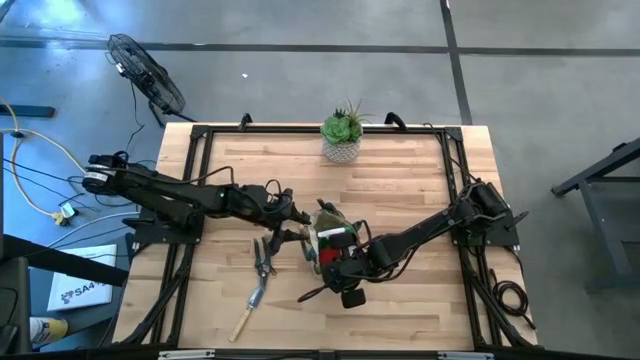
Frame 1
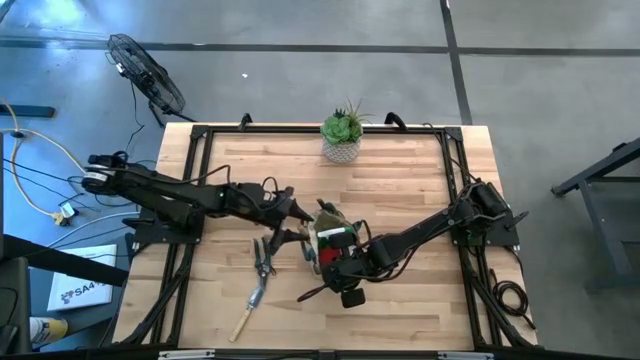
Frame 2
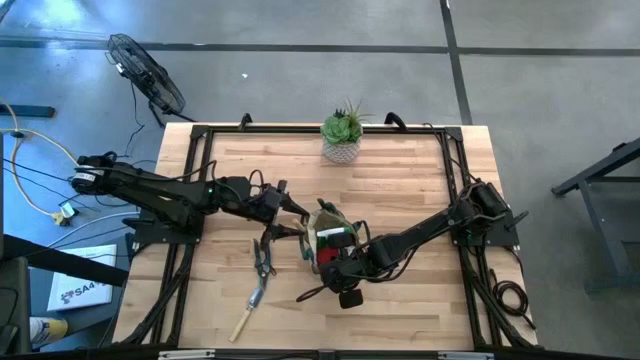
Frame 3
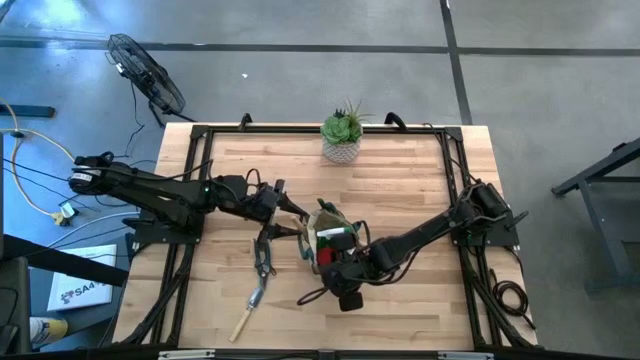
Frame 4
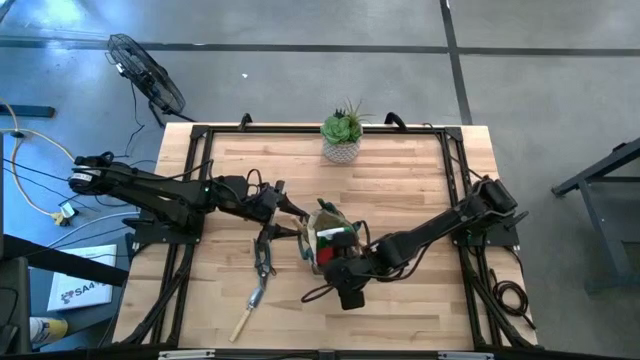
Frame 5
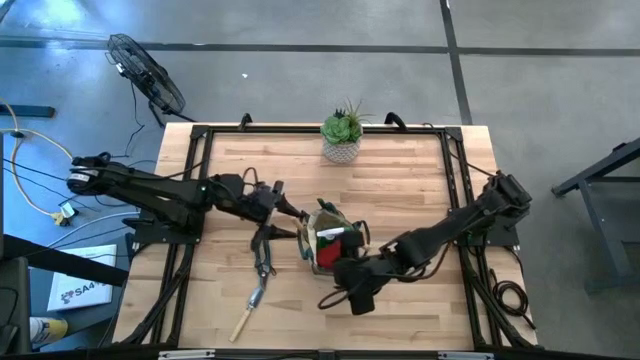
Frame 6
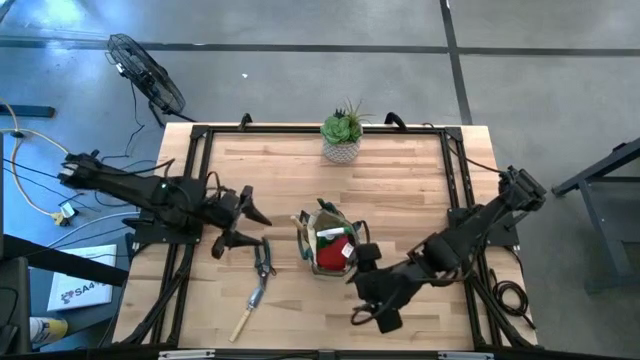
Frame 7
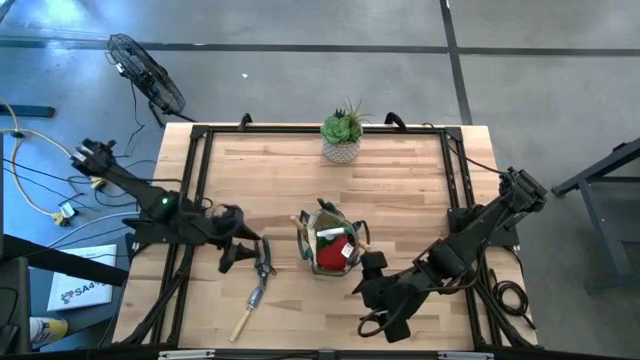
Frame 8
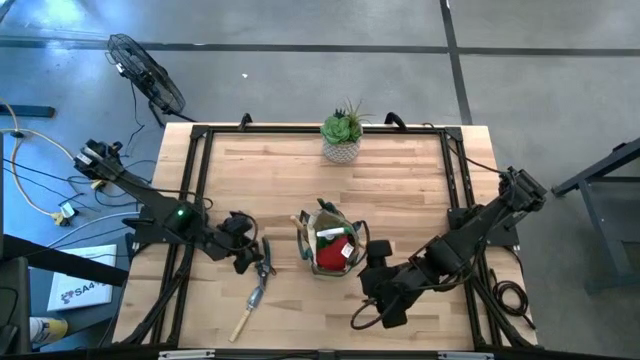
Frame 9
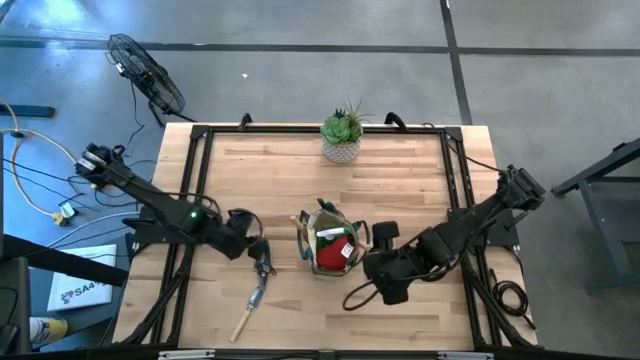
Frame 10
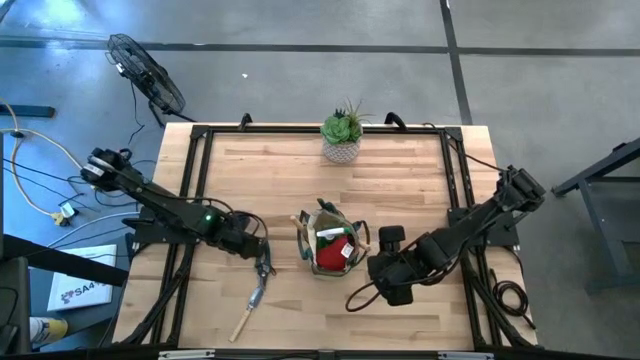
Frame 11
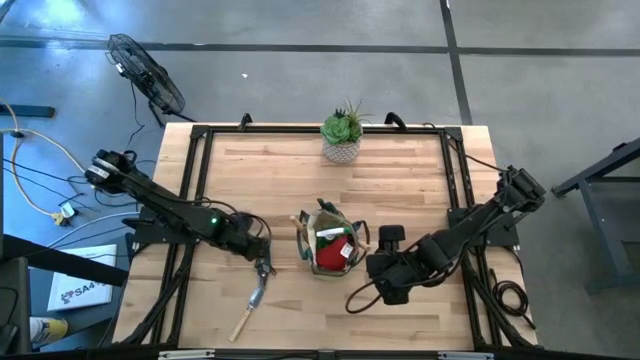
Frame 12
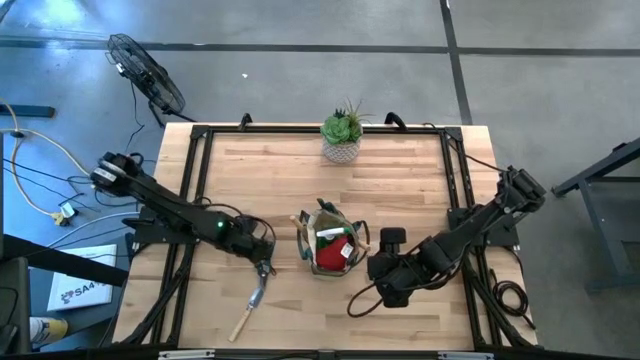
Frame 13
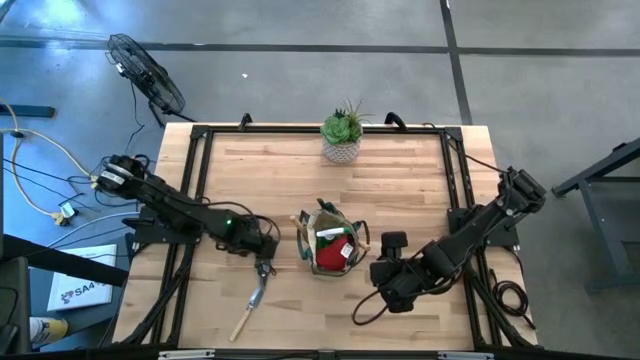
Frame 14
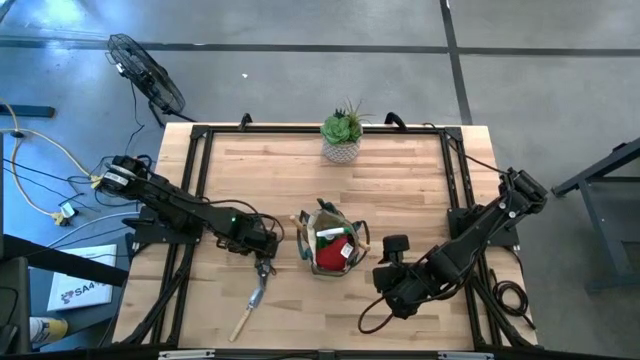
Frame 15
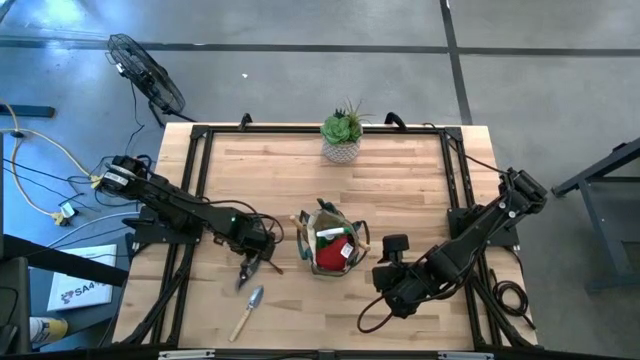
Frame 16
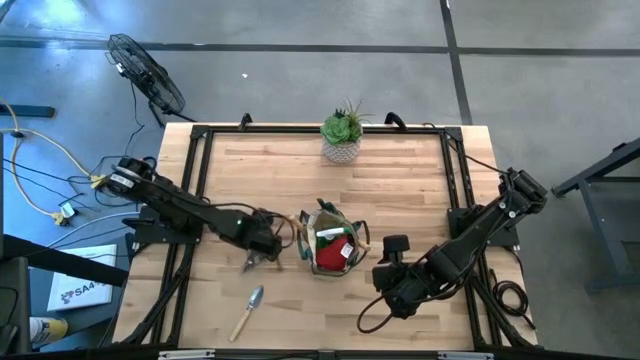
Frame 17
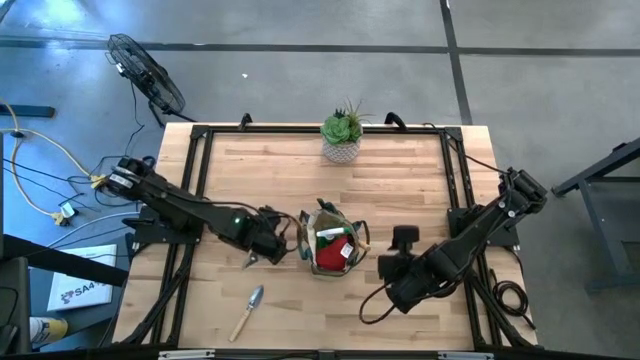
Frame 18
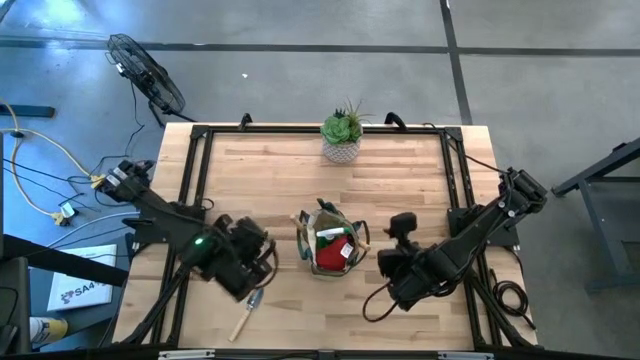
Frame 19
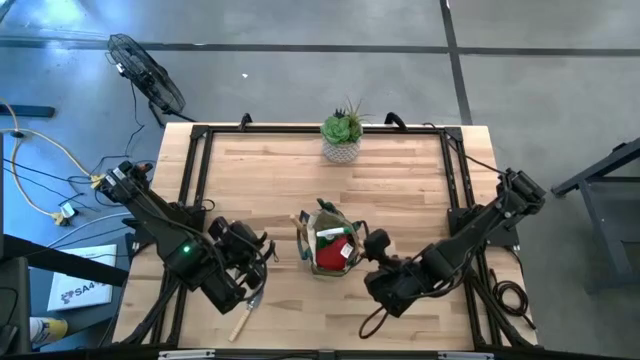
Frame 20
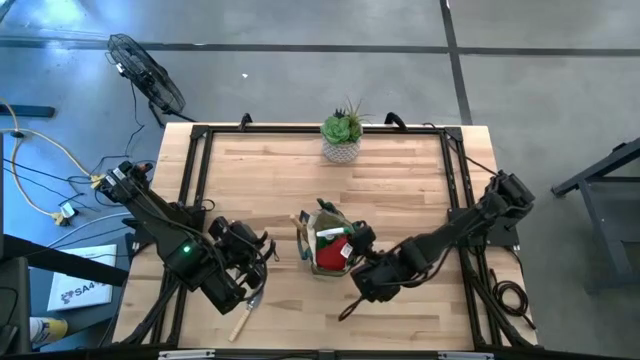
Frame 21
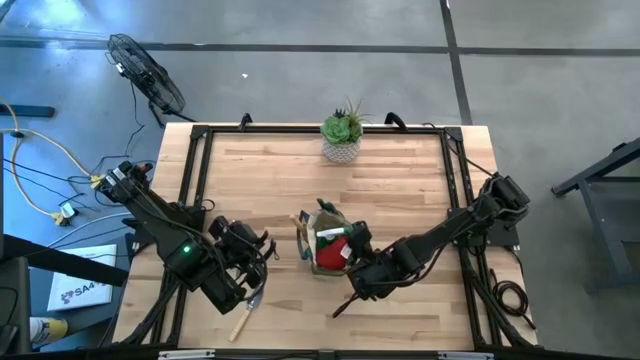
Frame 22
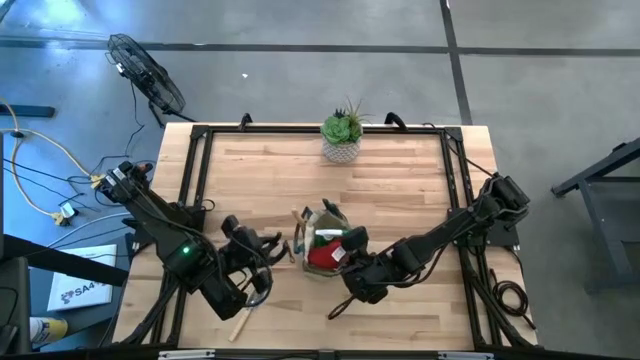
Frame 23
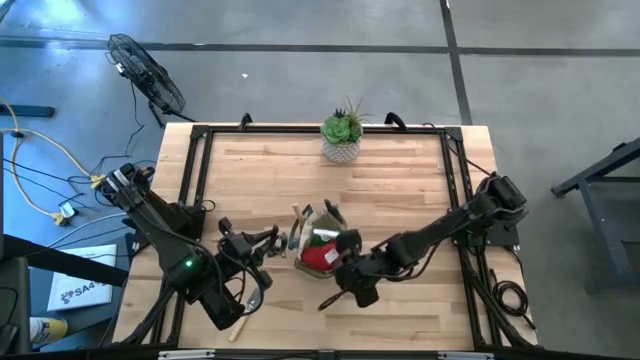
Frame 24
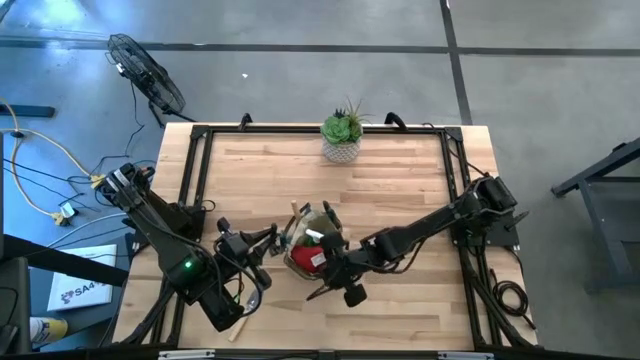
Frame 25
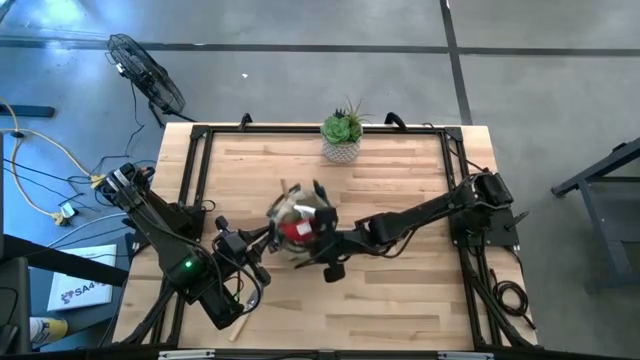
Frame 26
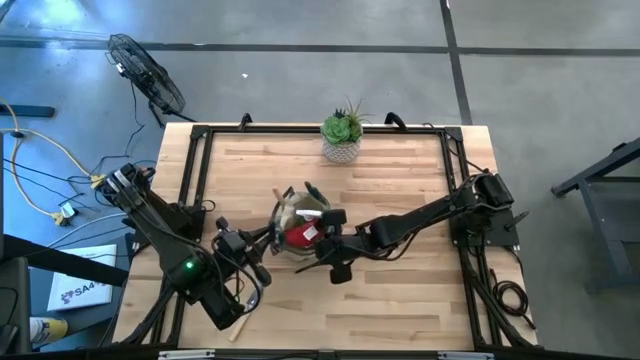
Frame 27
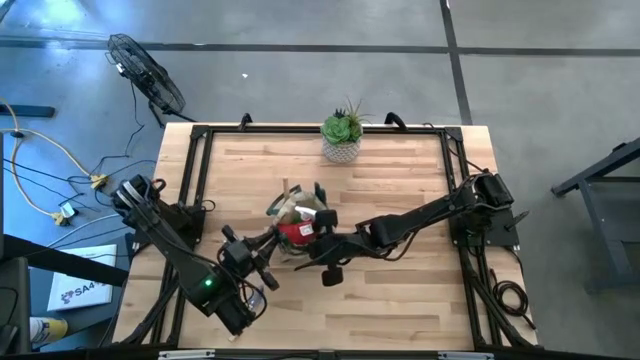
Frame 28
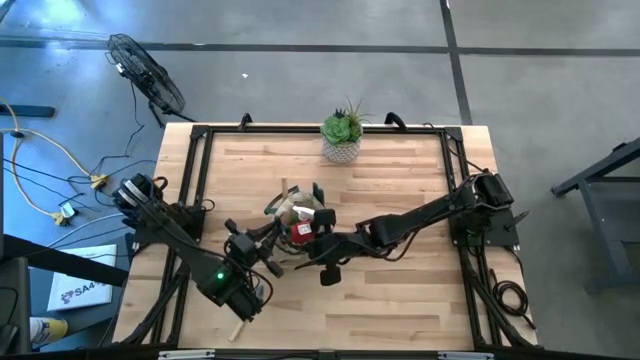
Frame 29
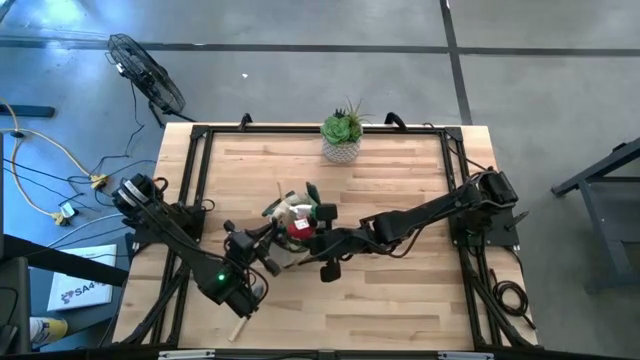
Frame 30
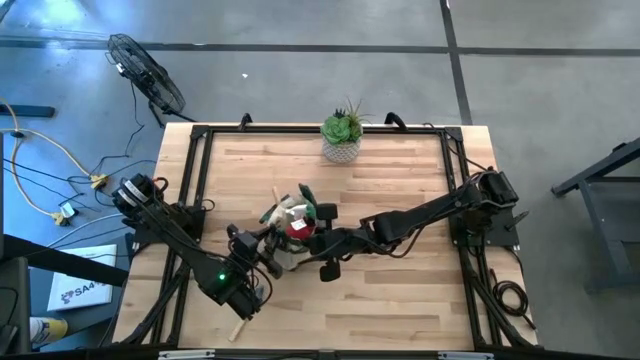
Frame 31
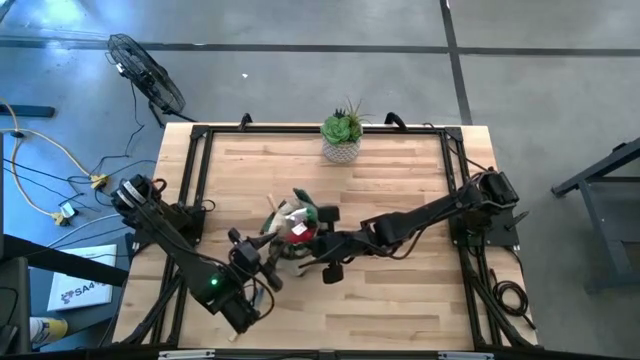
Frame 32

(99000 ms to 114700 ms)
Task: Pick & Place Garden tools in Gardening bag
Put the shear scissors into the gardening bag

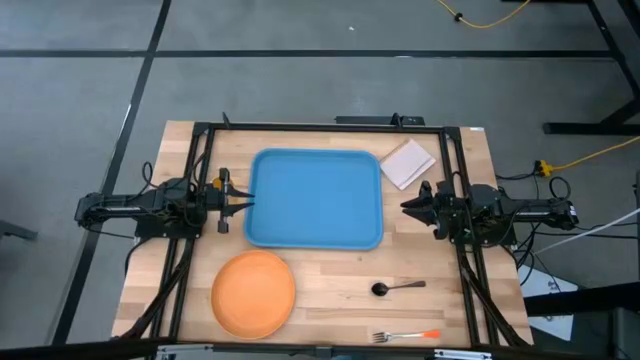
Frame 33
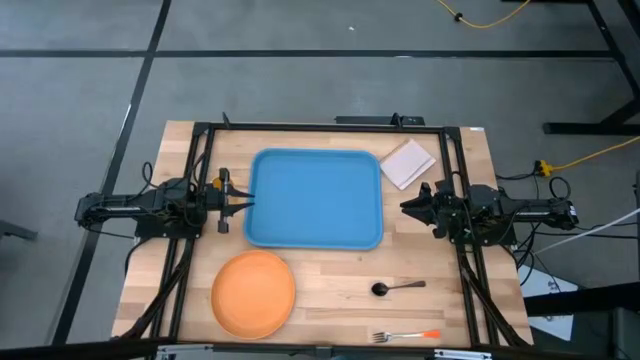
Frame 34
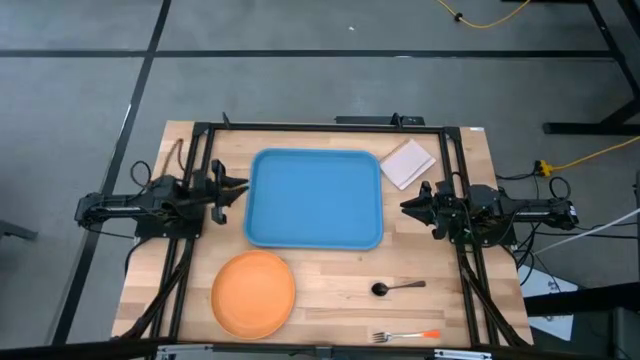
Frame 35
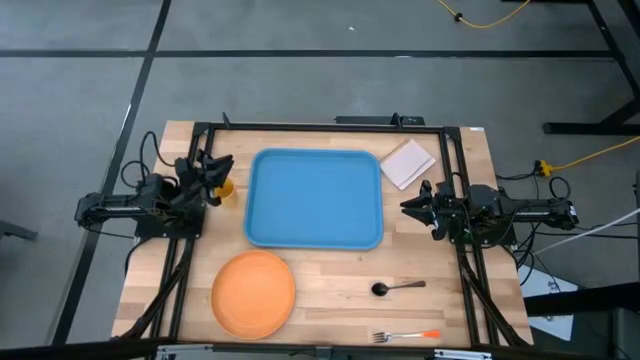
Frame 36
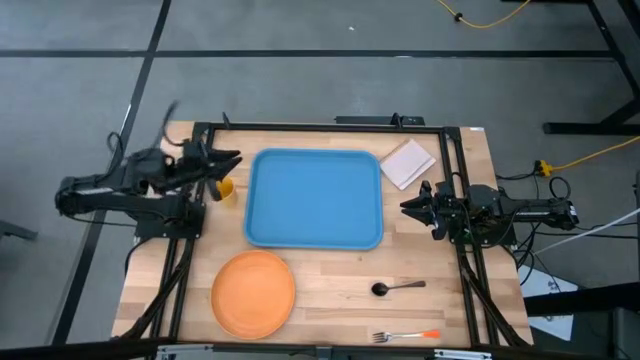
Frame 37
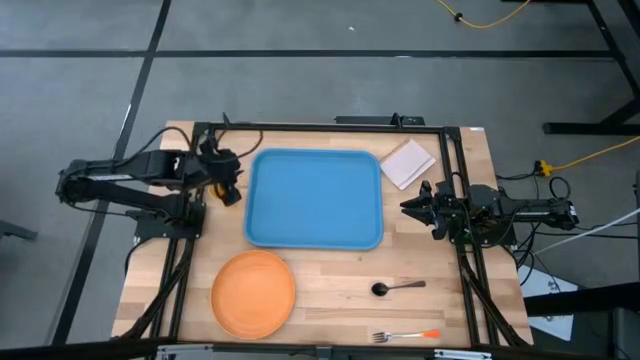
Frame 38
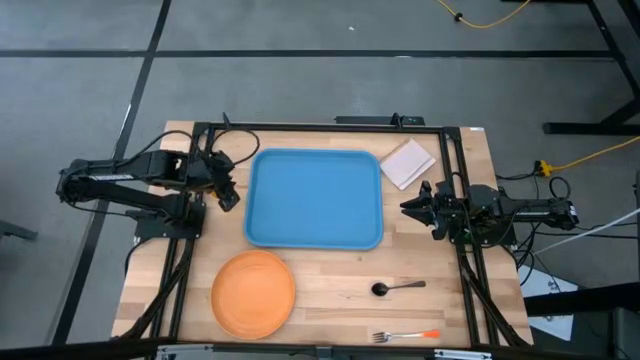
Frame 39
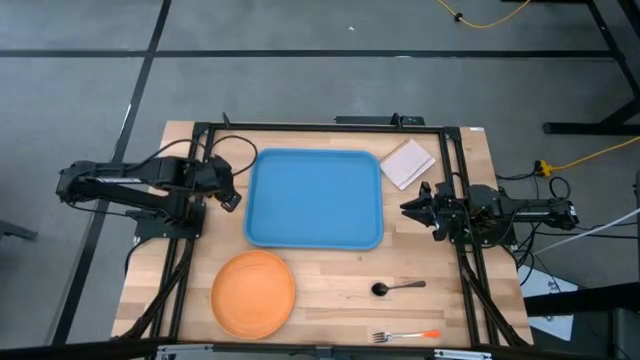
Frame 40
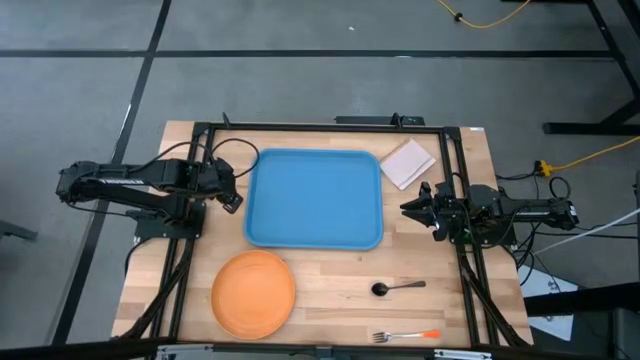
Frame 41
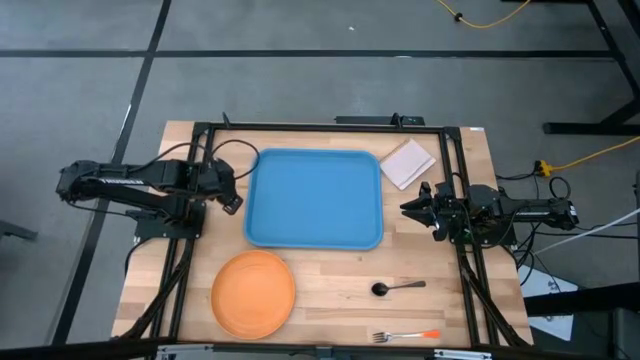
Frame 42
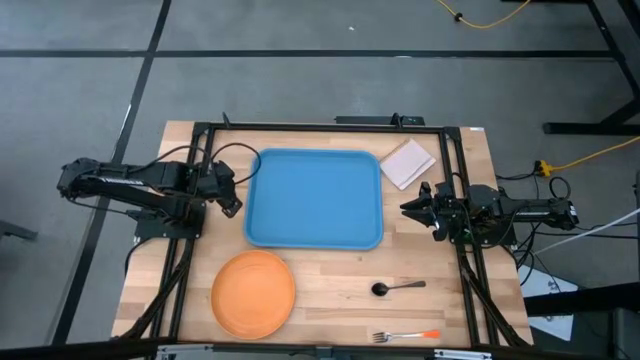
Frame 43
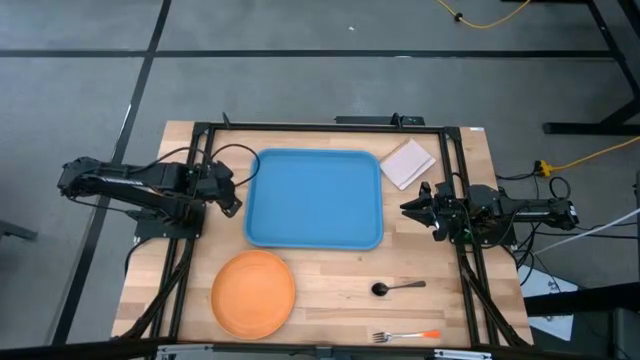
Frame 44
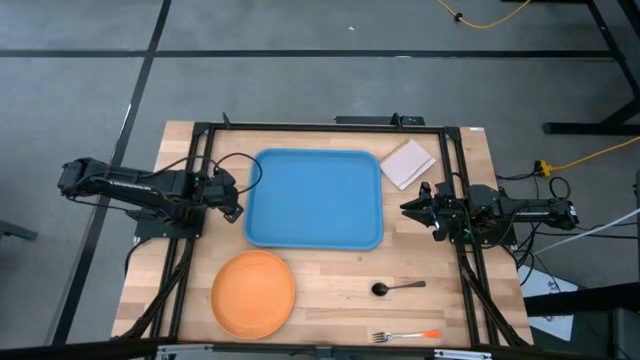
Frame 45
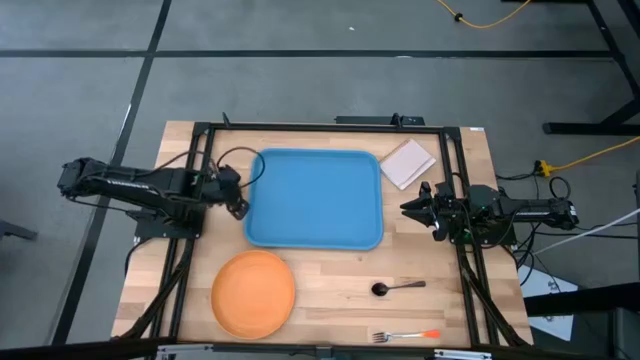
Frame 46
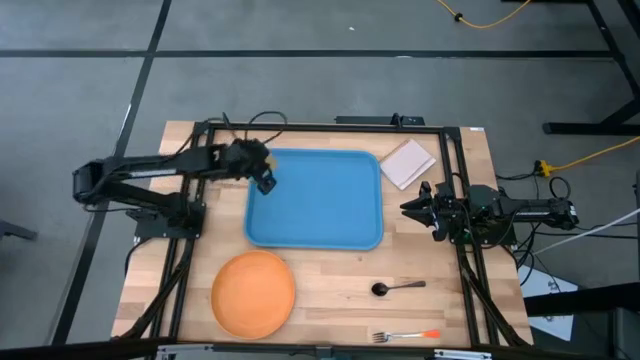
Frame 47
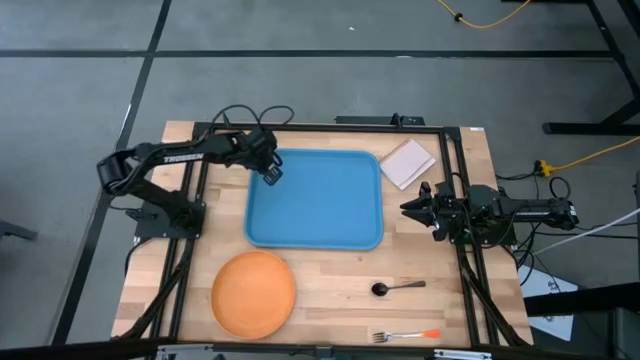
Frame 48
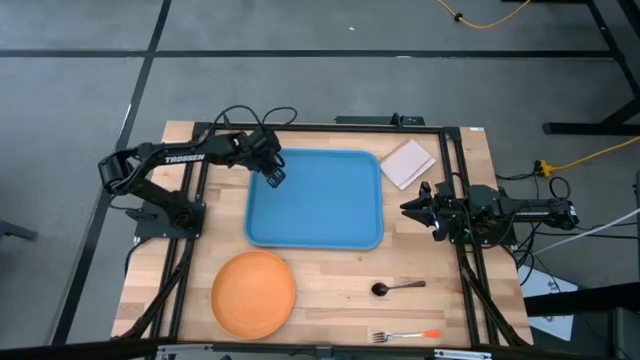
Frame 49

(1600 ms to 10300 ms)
Task: Pick and place plate/cup/fork/spoon on tray
Put the orange cup to the top left of the blue tray
